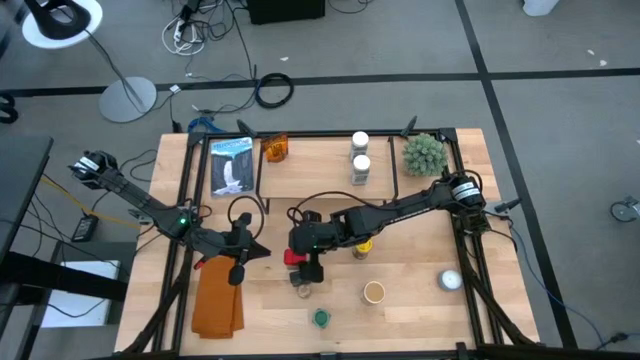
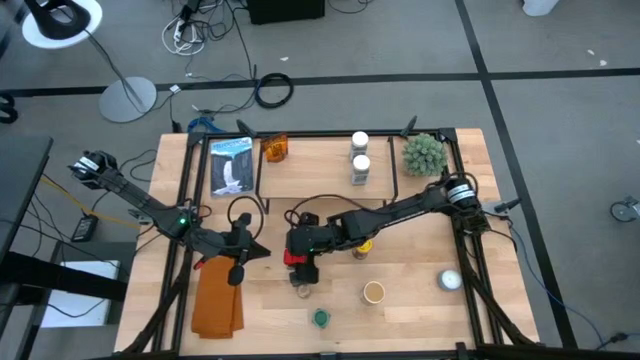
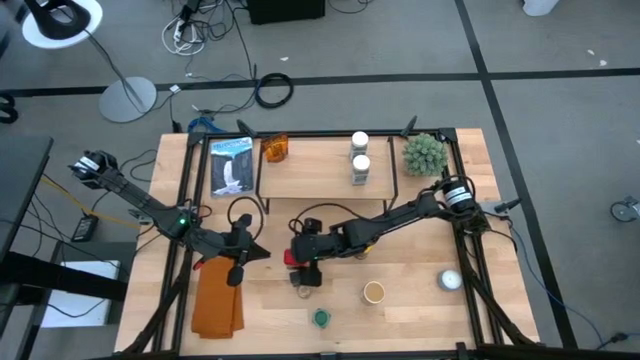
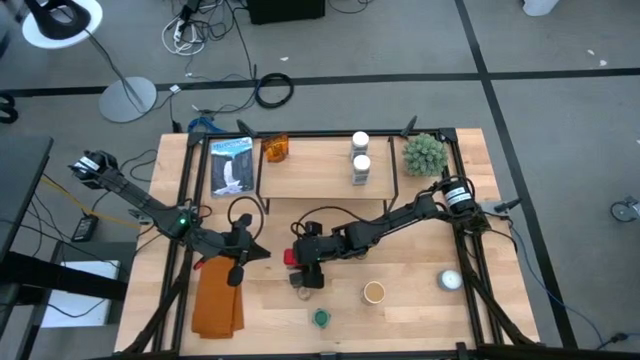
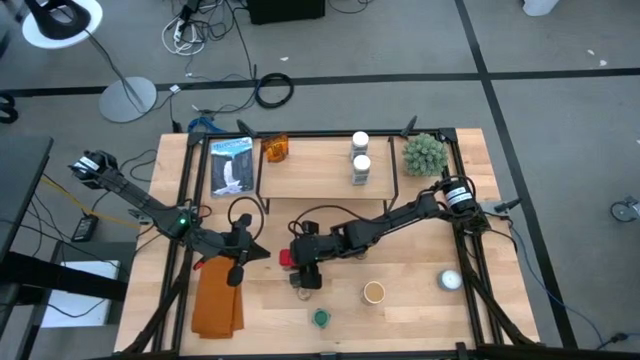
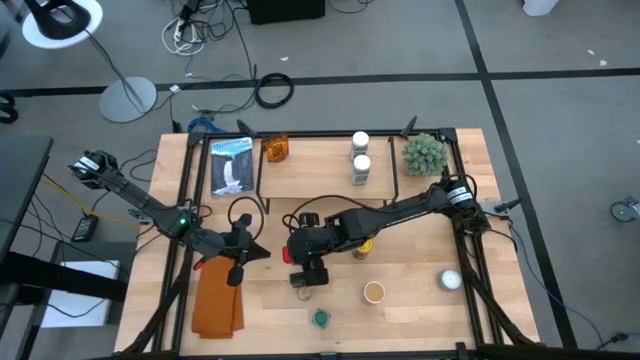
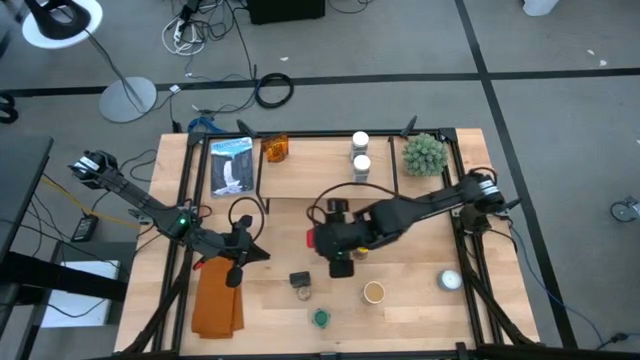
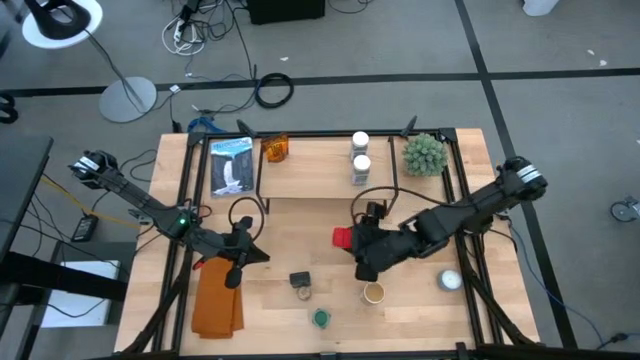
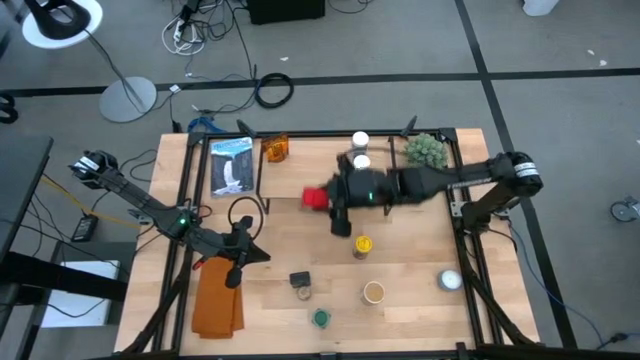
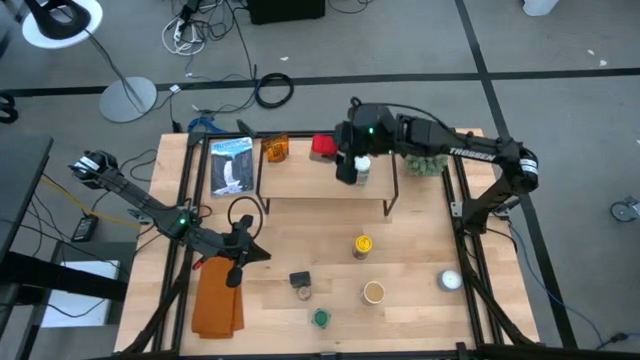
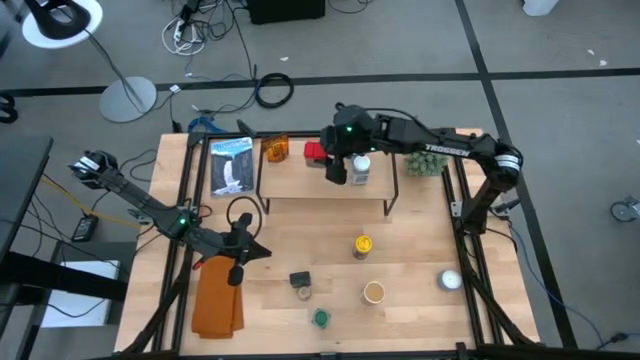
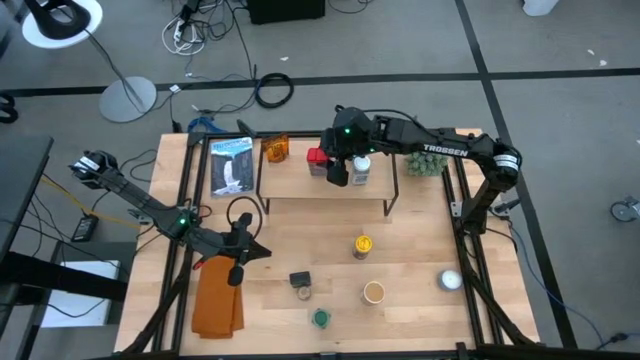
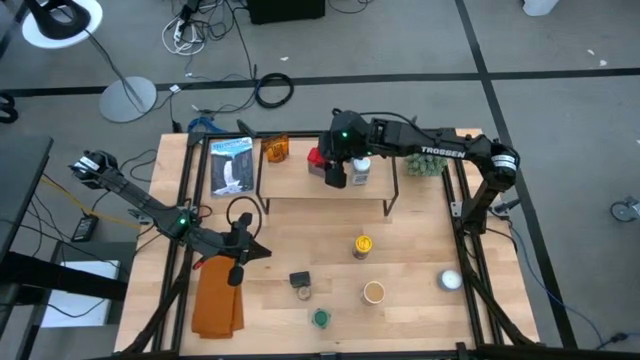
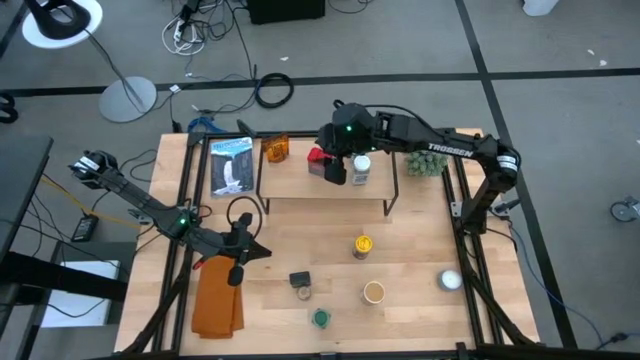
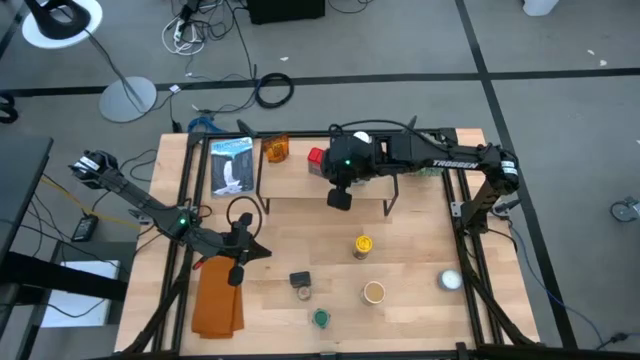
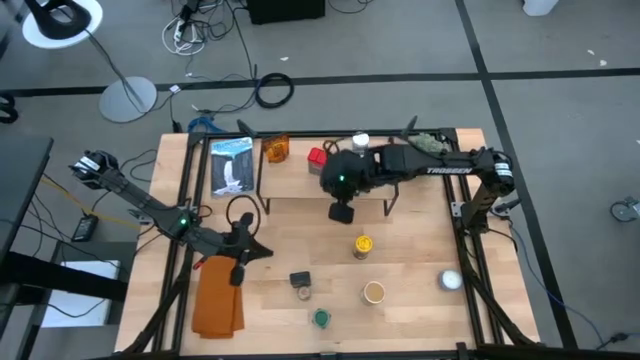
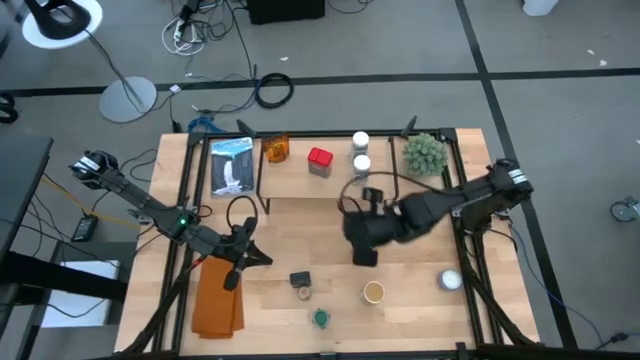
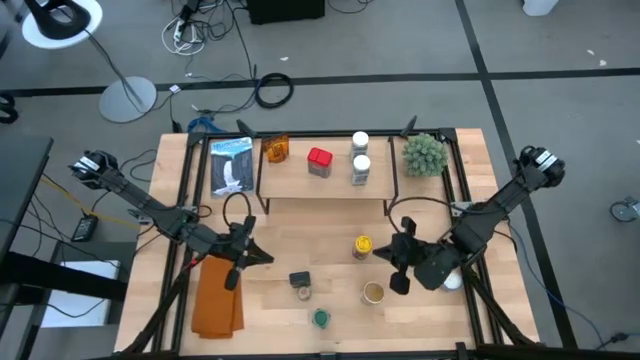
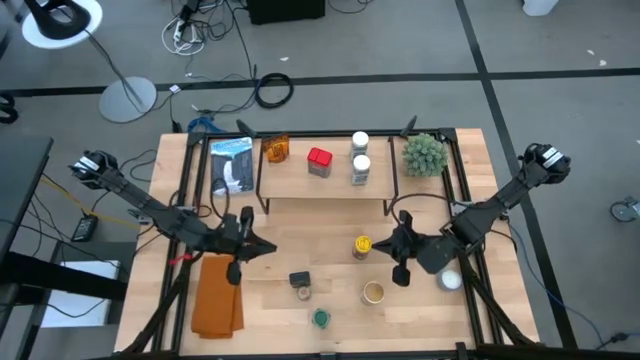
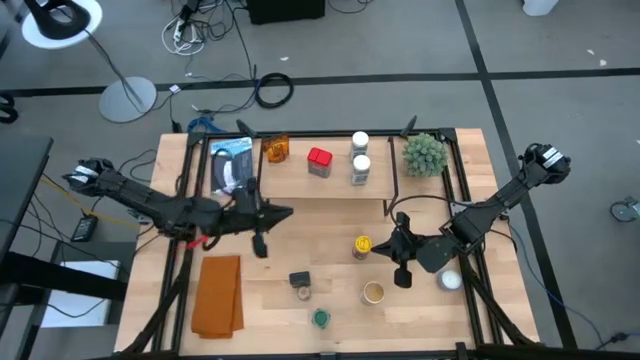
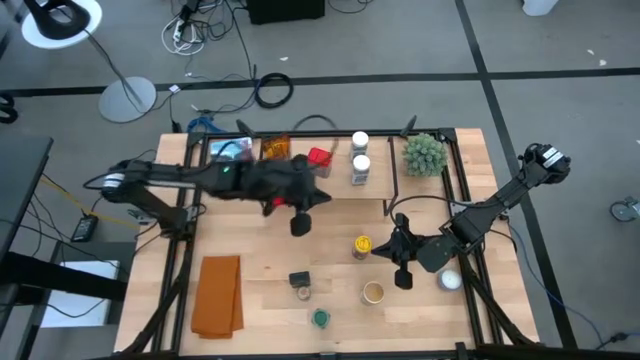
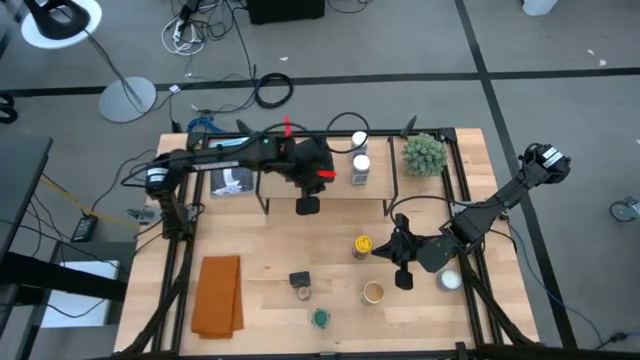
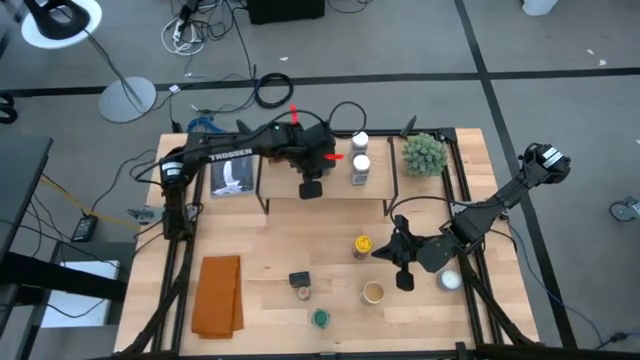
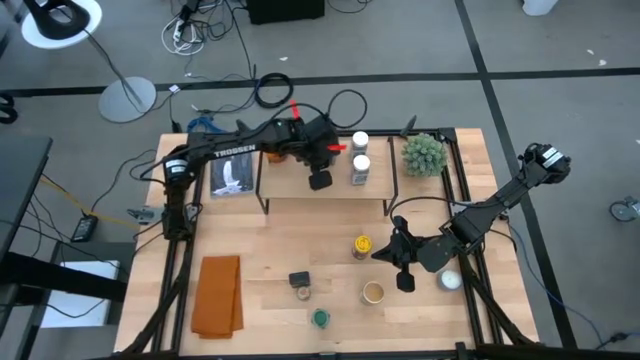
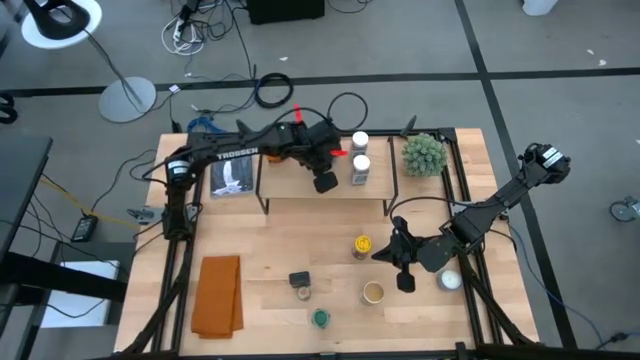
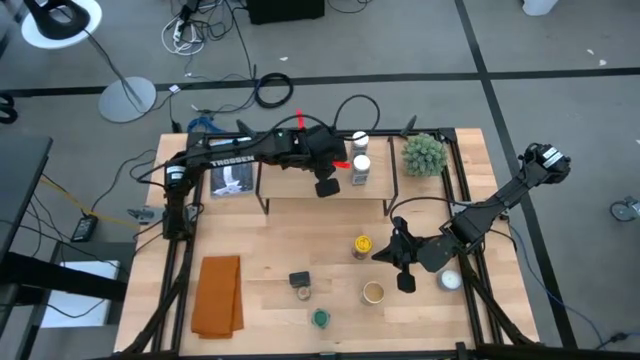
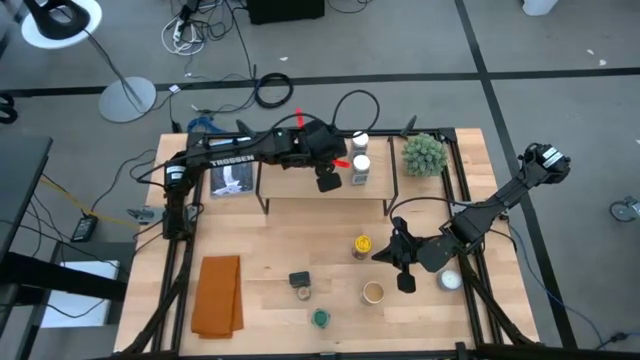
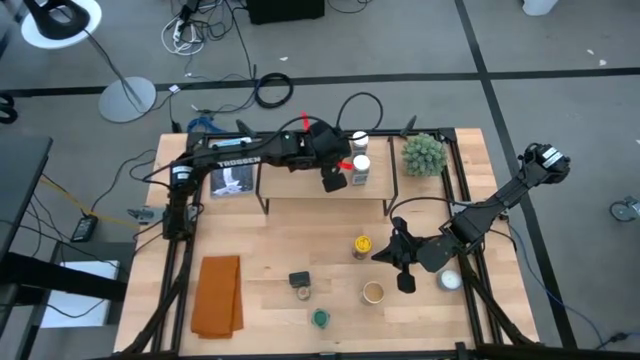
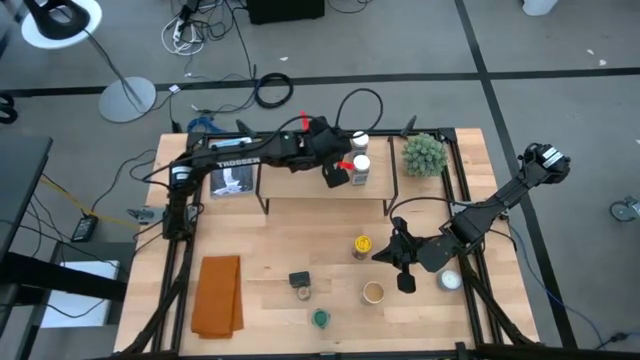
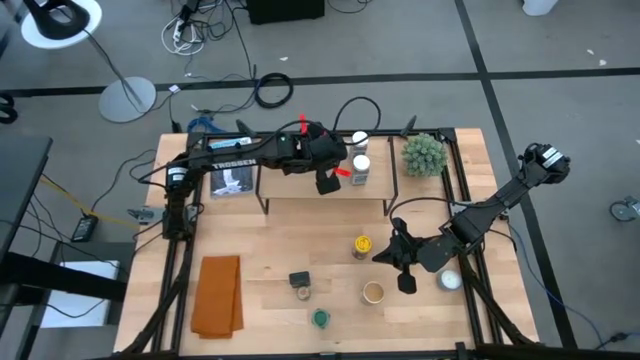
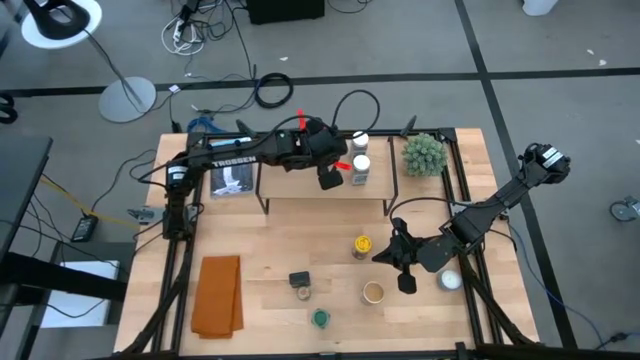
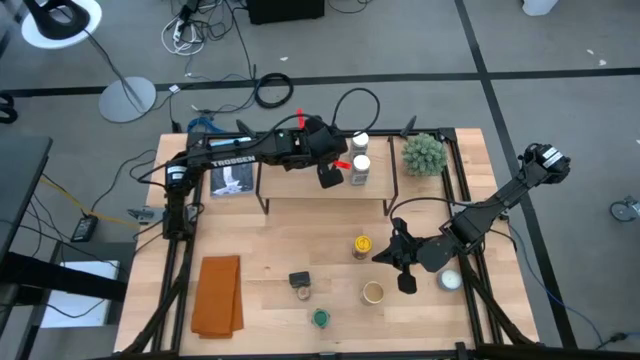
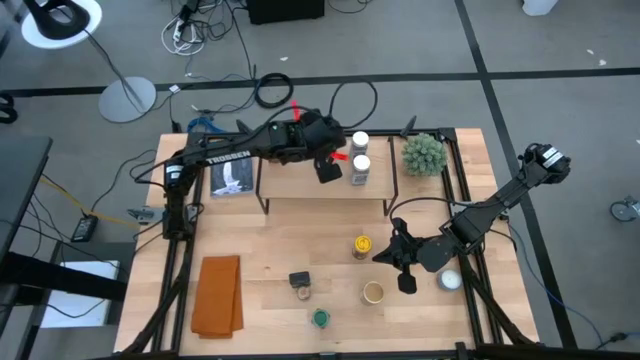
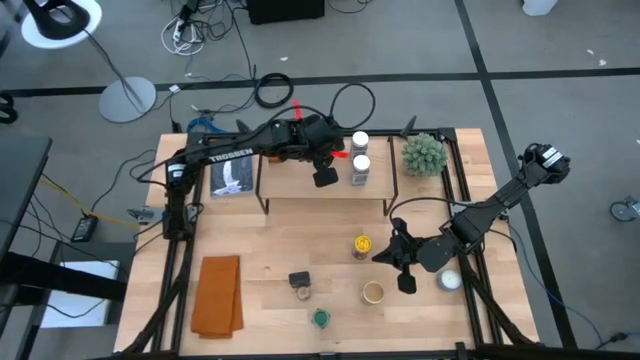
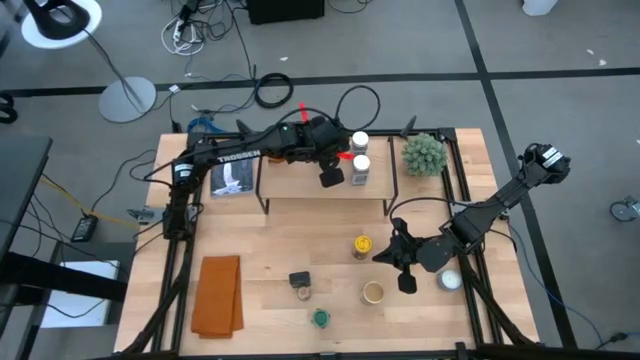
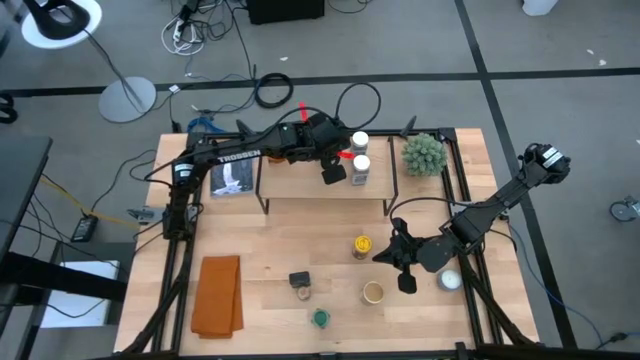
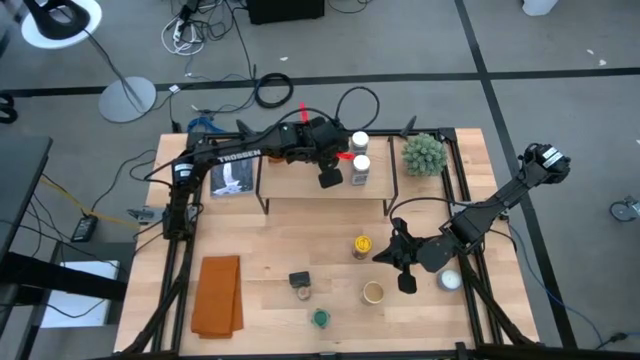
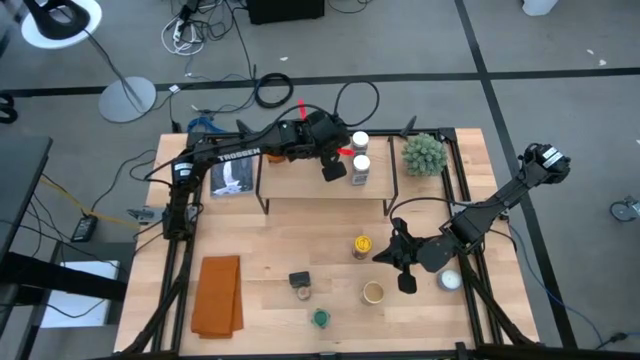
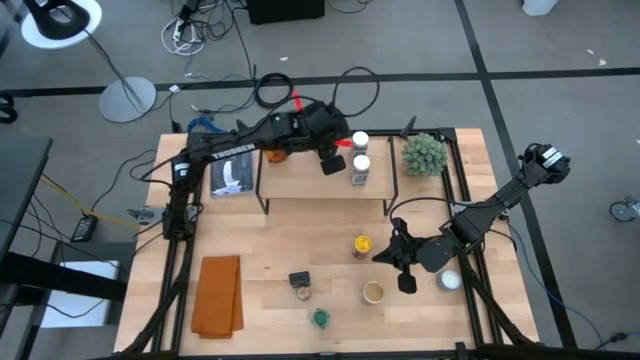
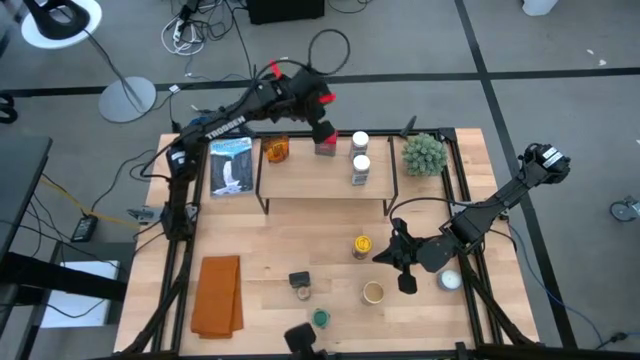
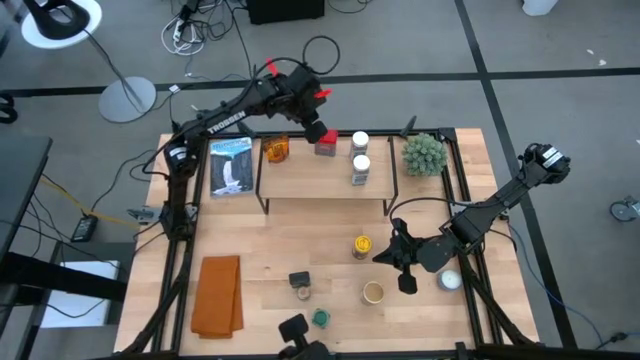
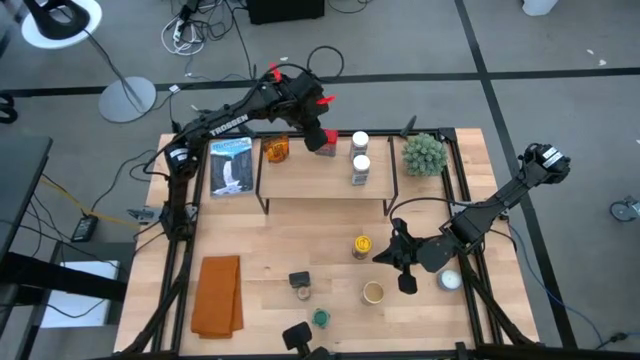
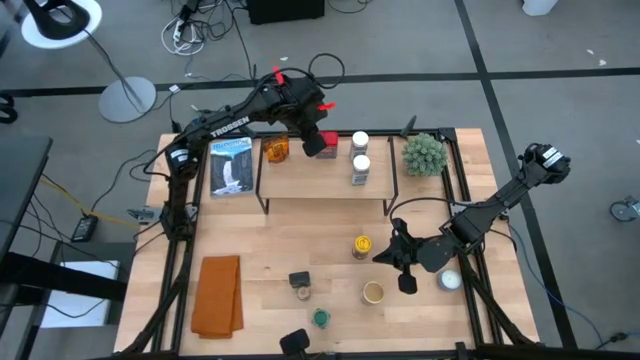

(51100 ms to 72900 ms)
Task: Shelf spices
Put the red seasoning can on the shelf
